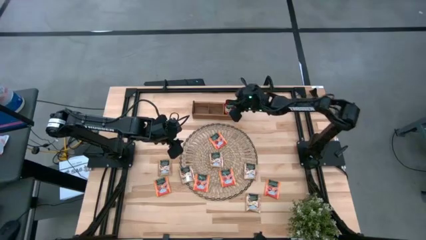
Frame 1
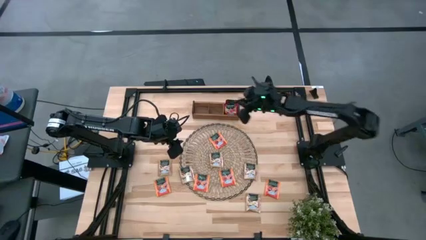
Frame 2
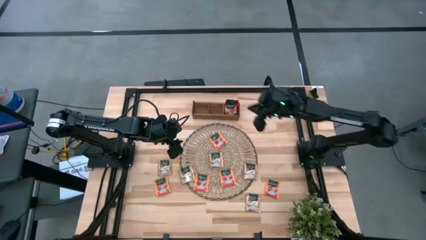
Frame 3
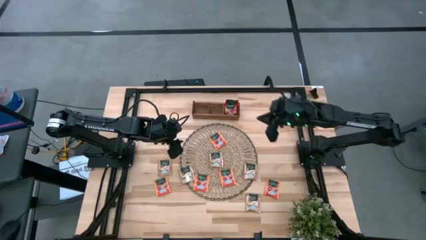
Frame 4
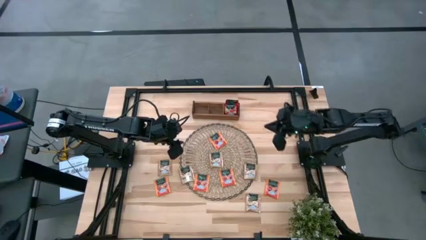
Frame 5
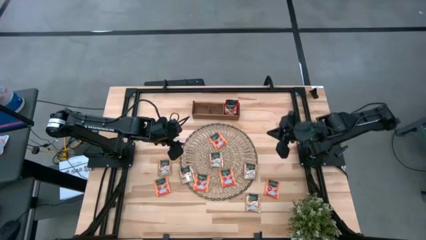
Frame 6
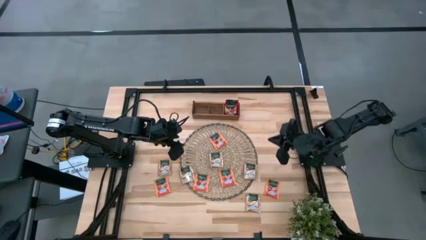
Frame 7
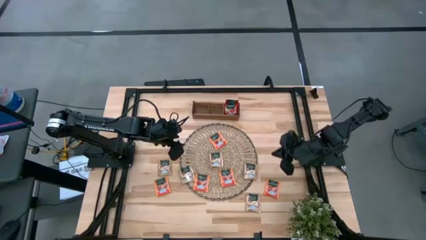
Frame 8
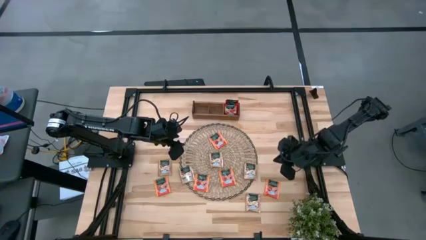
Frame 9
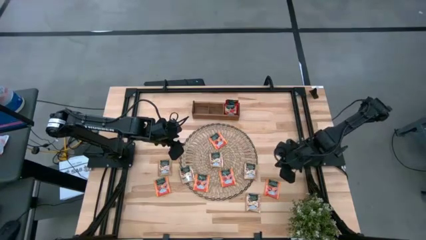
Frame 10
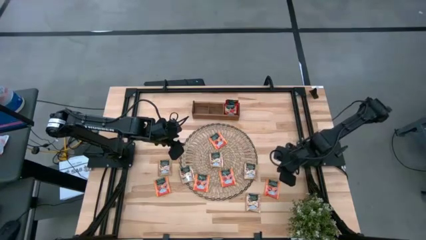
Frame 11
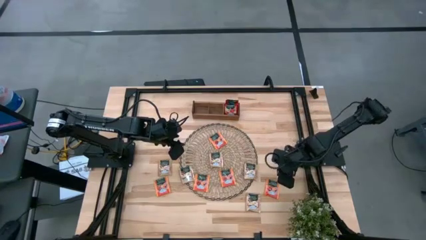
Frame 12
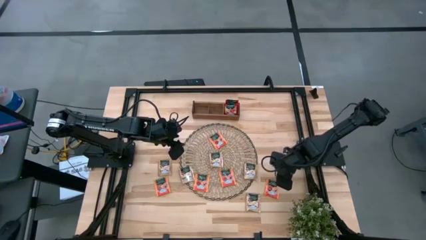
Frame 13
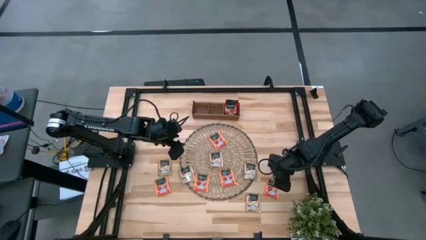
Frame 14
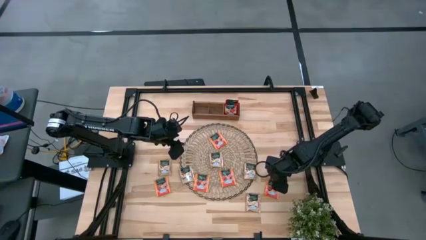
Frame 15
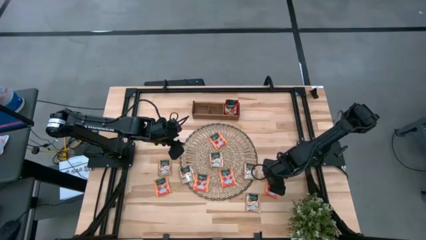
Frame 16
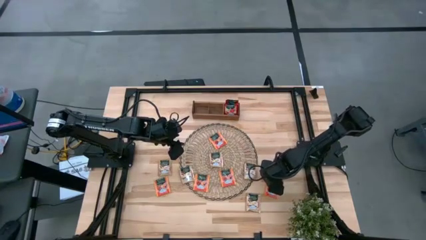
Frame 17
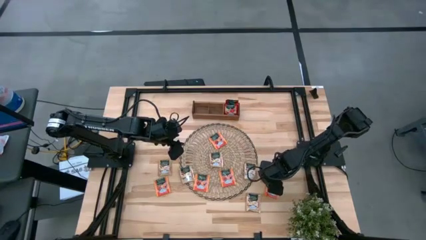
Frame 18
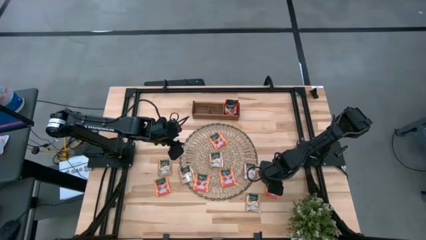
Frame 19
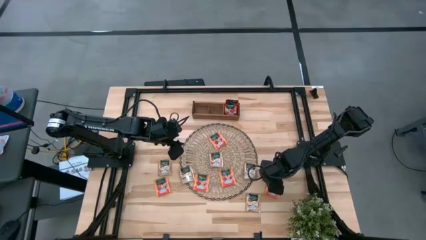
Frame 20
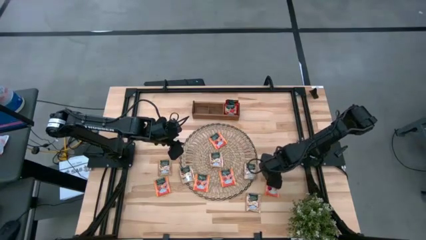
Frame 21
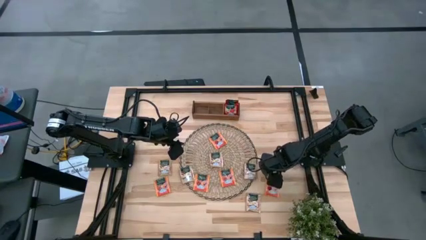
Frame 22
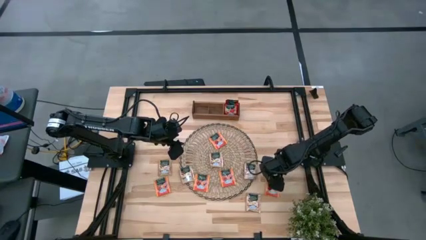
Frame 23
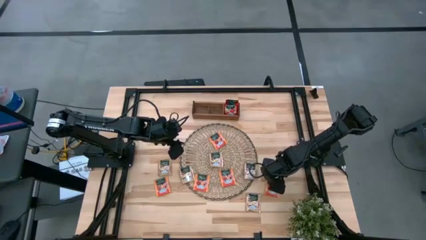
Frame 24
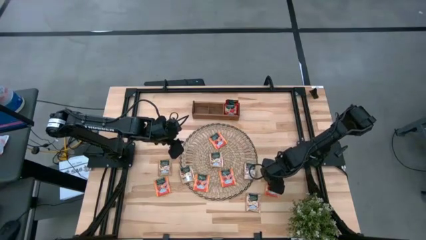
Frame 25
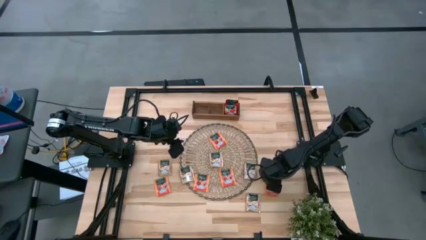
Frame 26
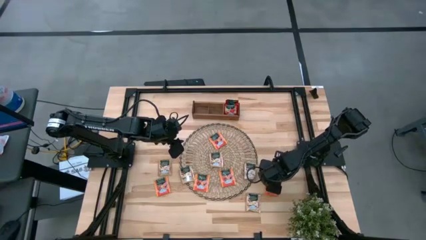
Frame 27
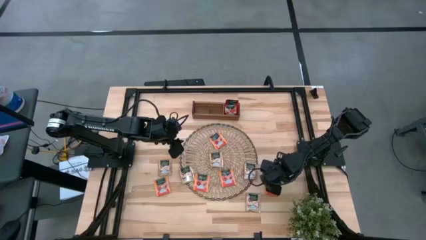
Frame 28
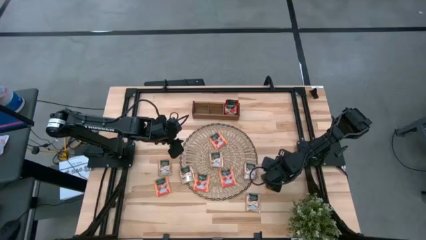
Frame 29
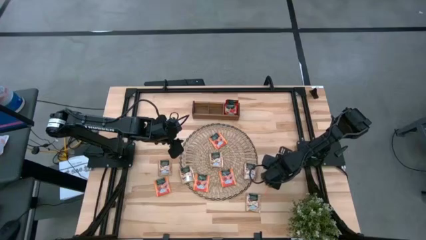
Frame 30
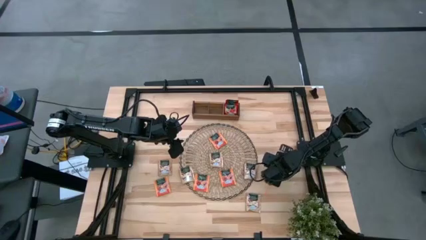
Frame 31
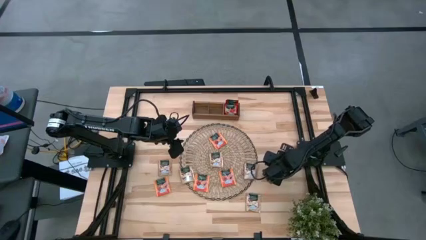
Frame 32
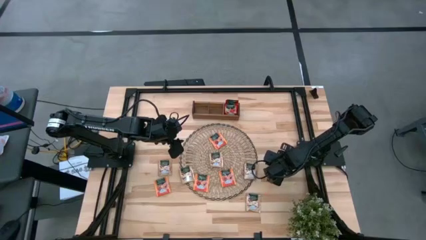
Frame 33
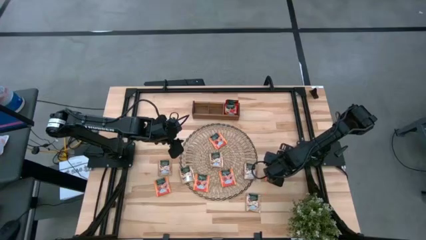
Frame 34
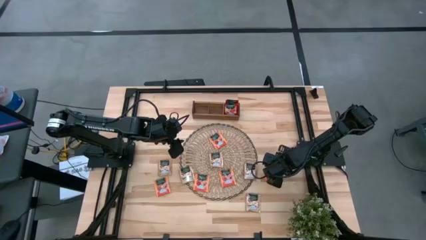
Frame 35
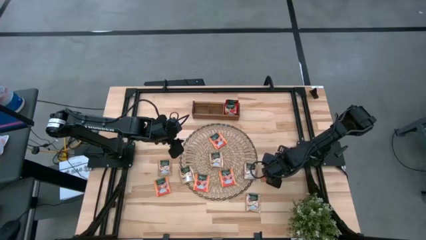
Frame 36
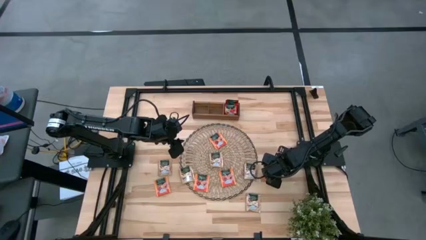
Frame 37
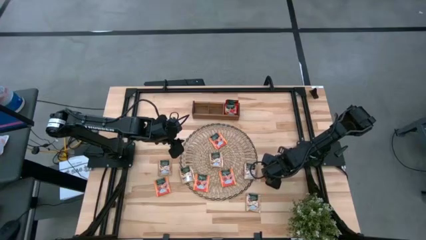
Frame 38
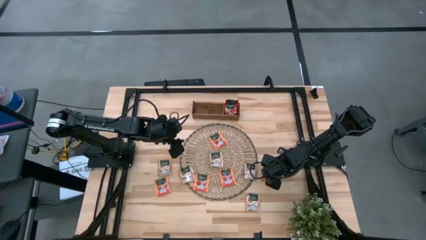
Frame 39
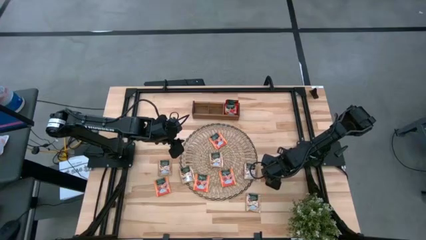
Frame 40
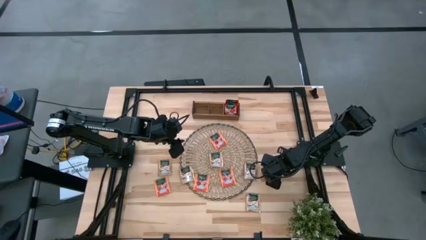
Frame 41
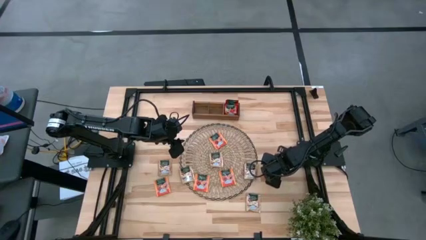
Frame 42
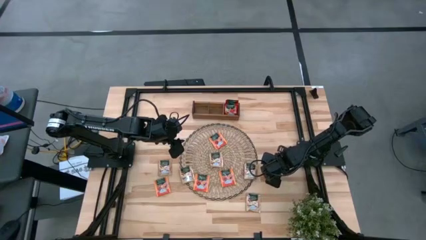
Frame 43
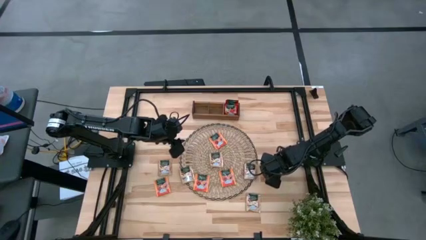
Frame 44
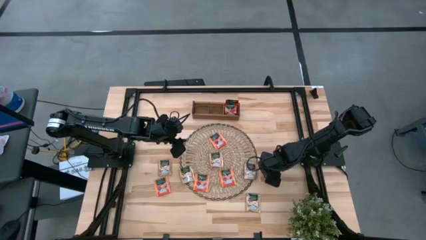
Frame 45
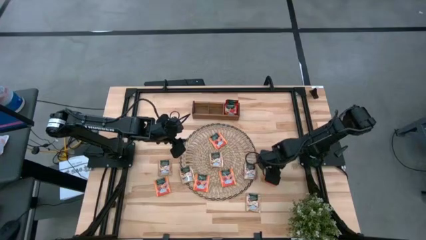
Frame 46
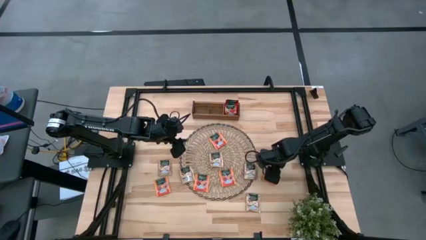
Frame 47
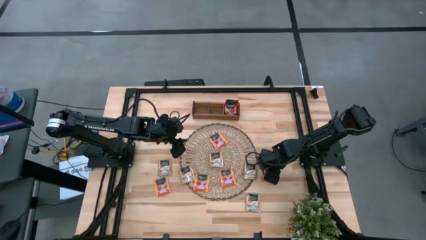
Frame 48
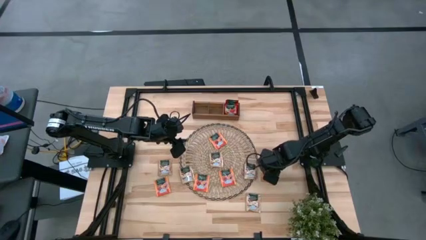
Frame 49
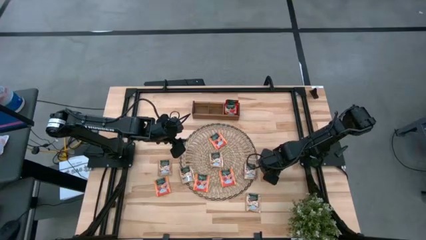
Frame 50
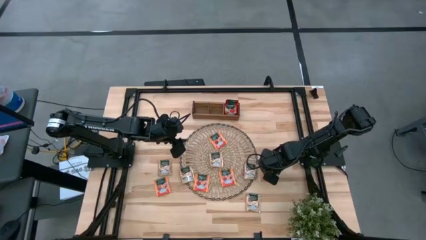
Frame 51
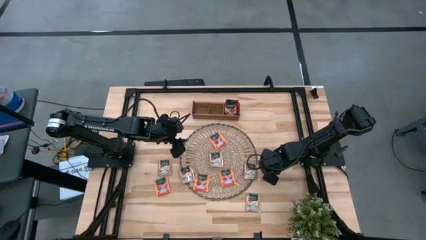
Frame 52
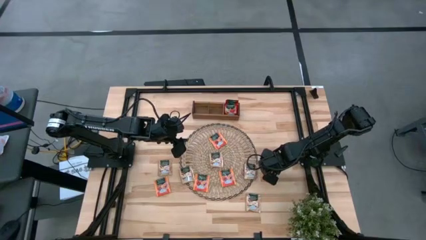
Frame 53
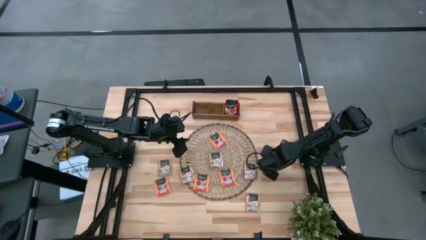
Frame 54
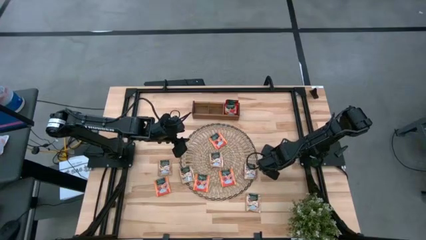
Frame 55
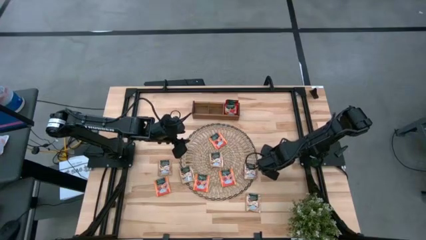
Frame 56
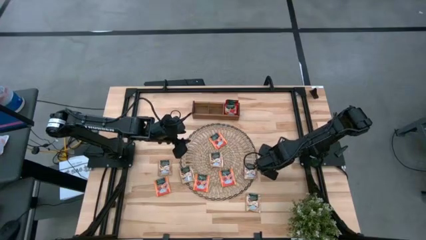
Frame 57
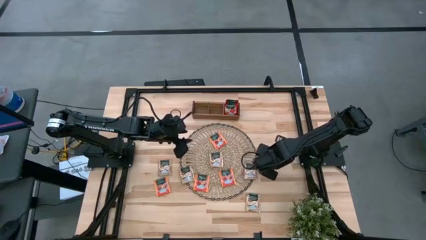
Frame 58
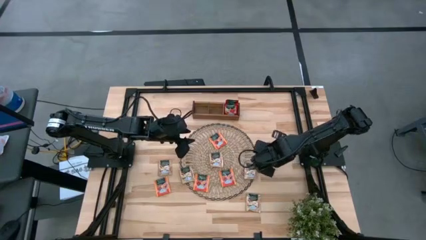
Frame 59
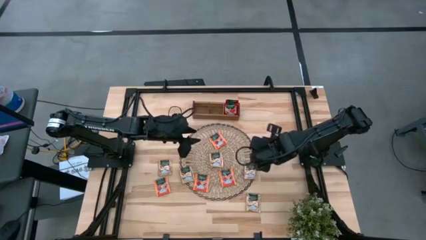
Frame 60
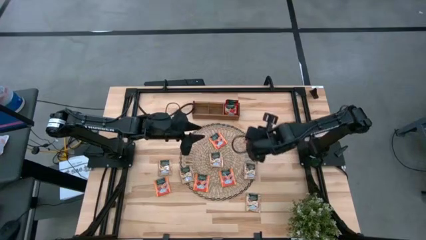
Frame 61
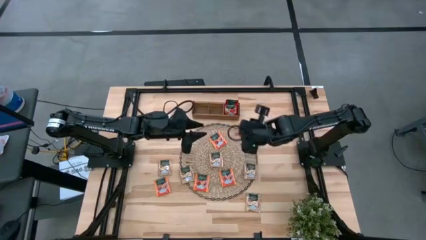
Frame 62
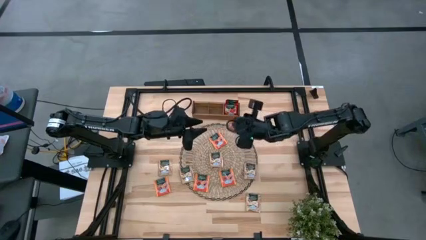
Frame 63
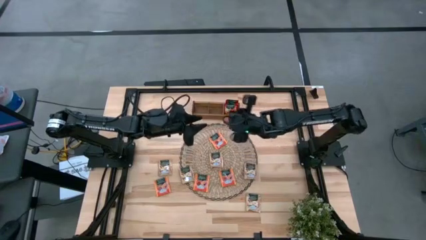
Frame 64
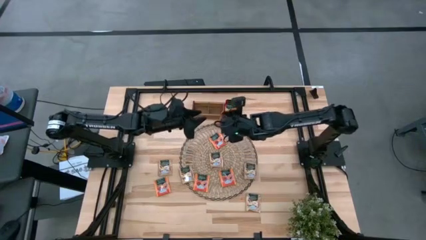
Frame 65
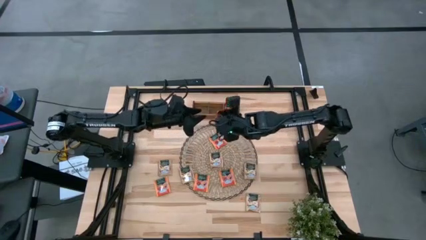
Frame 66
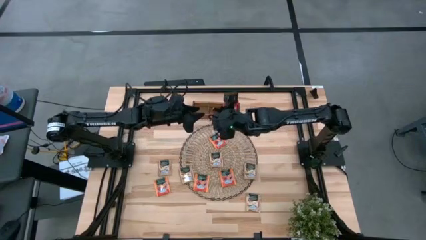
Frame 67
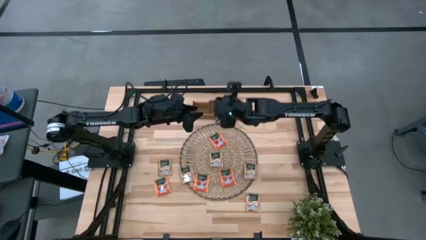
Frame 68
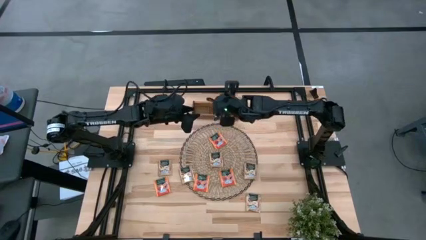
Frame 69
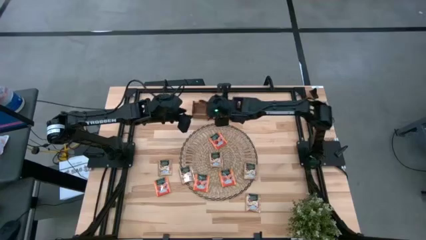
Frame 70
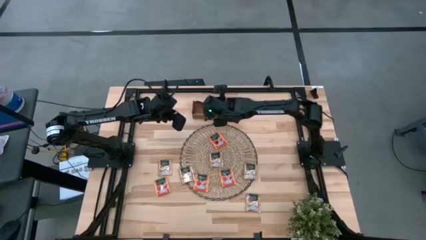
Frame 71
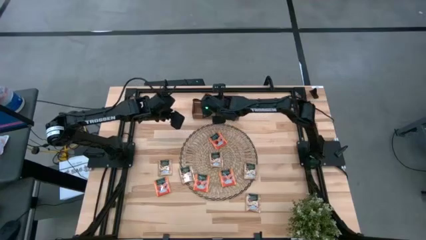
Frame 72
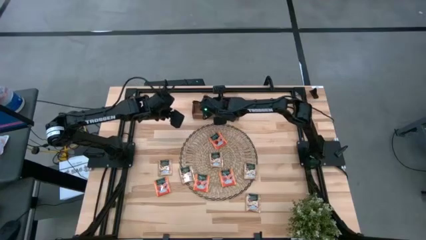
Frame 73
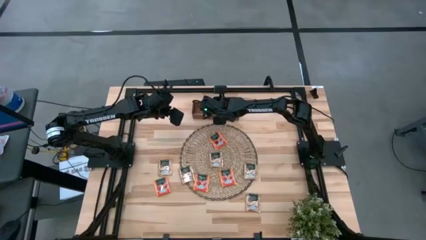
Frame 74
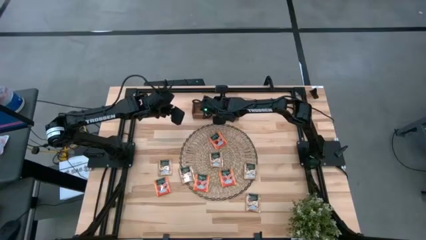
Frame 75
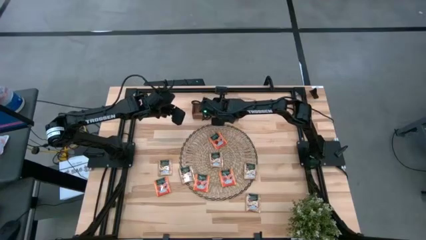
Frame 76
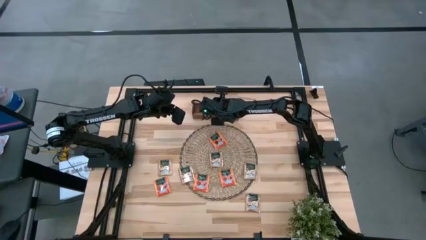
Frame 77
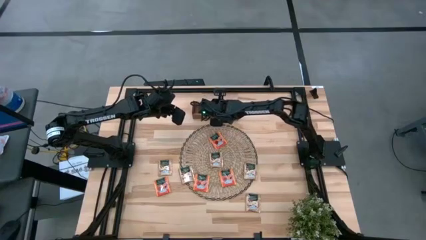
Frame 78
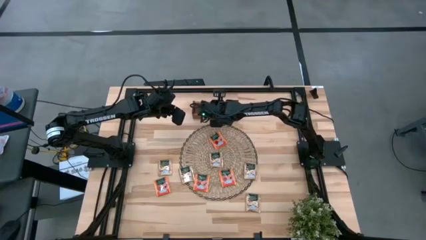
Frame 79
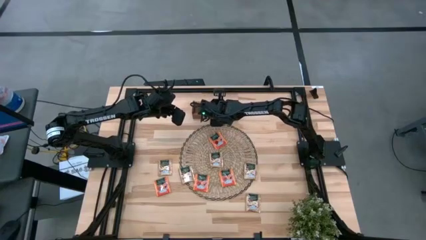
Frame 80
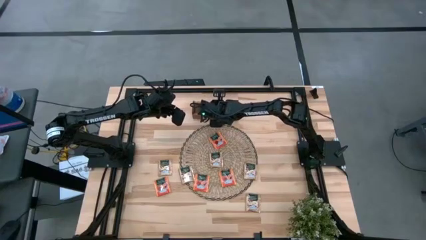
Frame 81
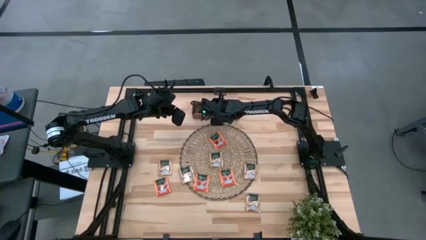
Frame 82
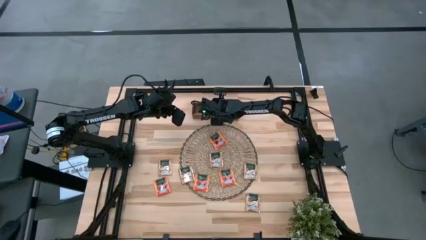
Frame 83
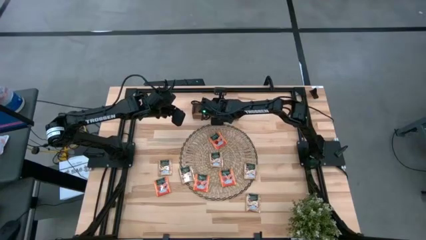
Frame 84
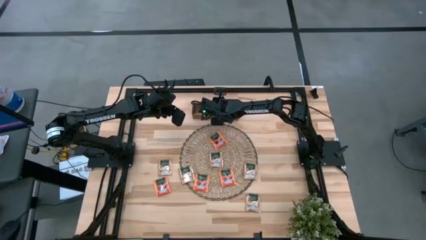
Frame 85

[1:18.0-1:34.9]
Task: Pick & Place Tea
Put the orange tea bag into the middle section of the wooden organizer
